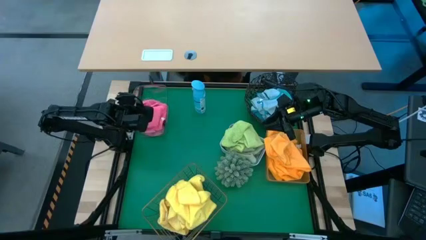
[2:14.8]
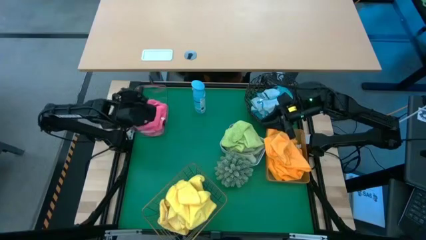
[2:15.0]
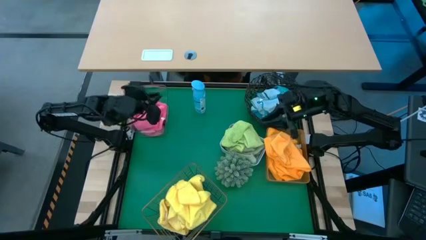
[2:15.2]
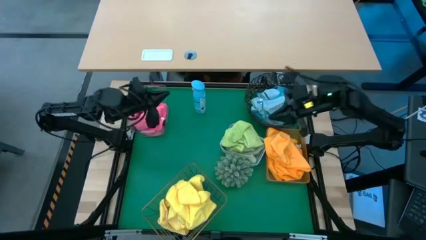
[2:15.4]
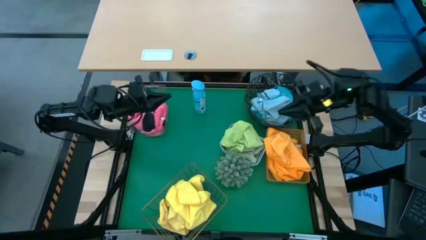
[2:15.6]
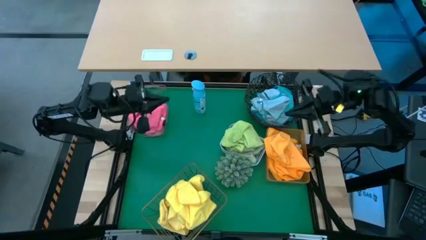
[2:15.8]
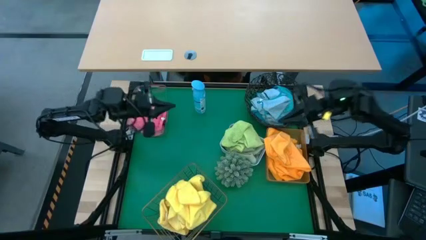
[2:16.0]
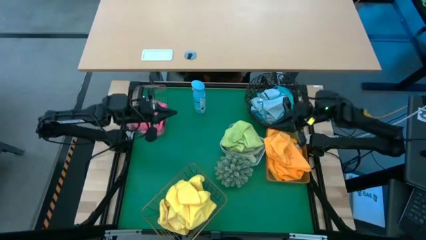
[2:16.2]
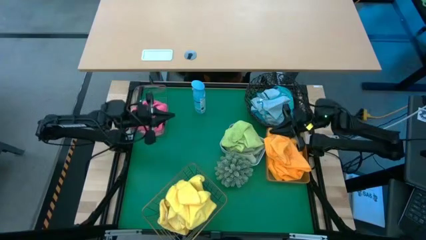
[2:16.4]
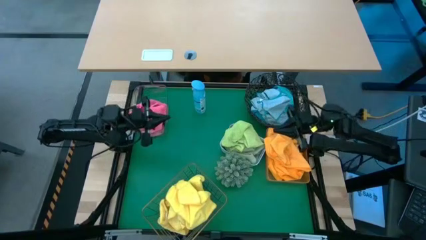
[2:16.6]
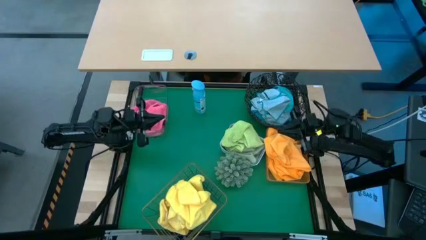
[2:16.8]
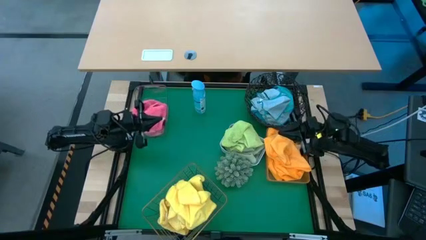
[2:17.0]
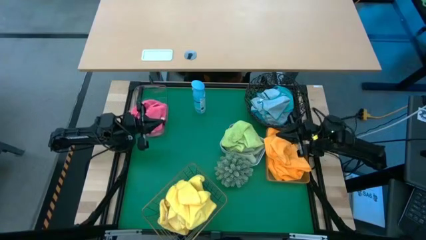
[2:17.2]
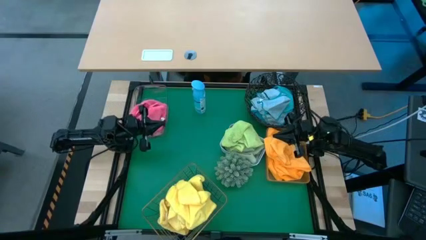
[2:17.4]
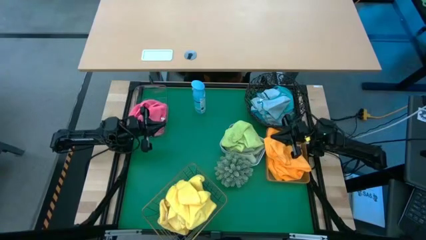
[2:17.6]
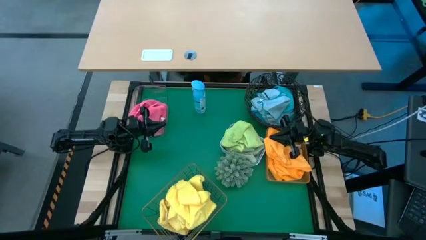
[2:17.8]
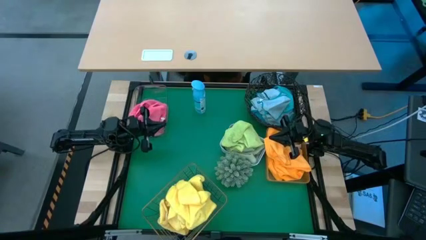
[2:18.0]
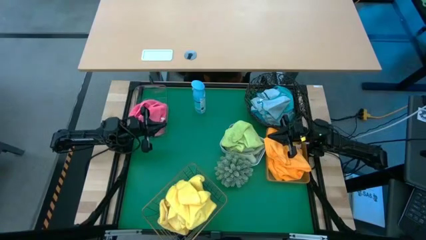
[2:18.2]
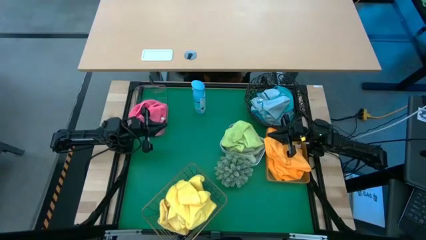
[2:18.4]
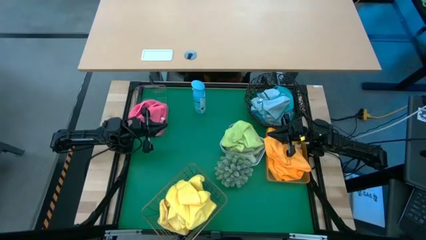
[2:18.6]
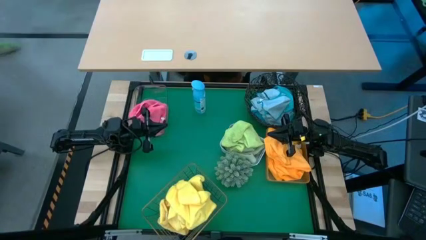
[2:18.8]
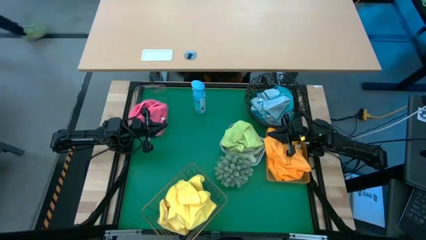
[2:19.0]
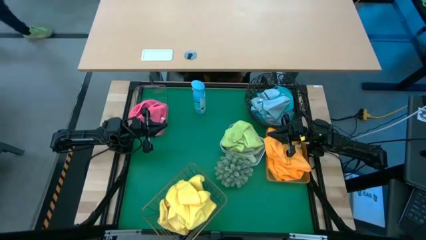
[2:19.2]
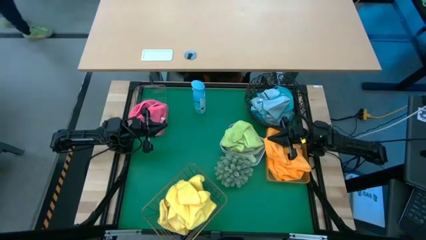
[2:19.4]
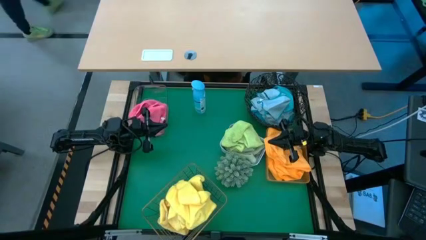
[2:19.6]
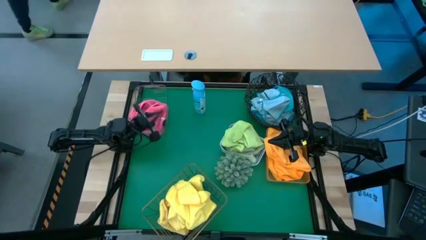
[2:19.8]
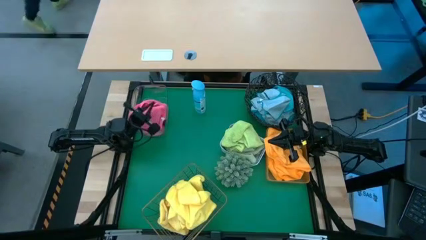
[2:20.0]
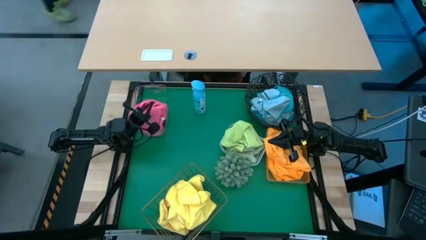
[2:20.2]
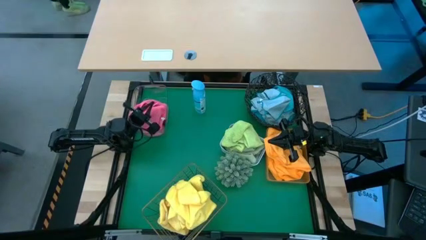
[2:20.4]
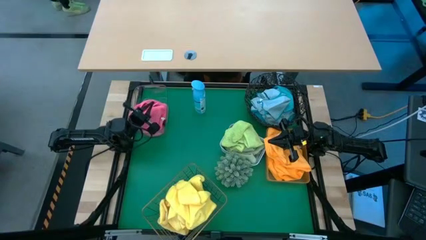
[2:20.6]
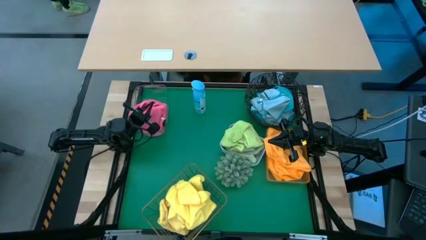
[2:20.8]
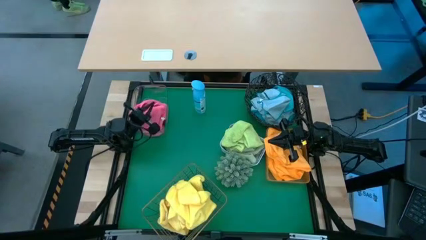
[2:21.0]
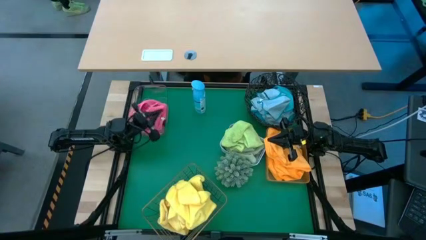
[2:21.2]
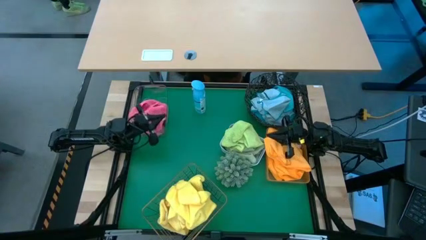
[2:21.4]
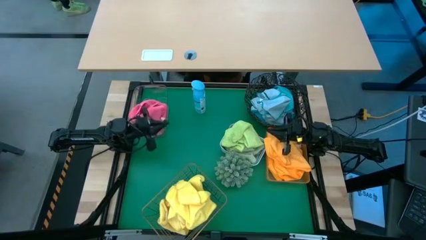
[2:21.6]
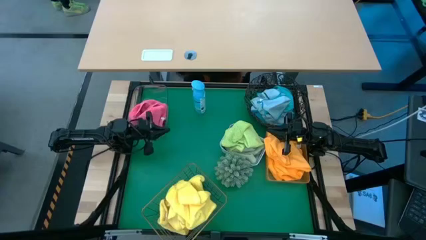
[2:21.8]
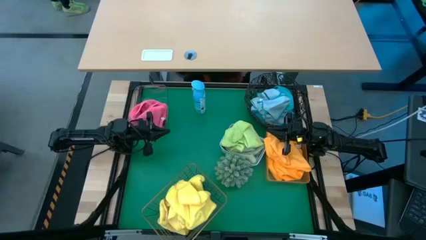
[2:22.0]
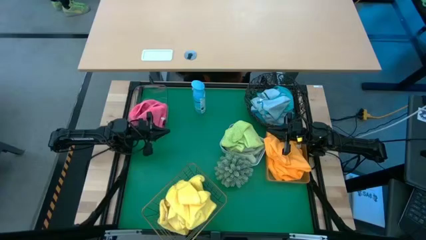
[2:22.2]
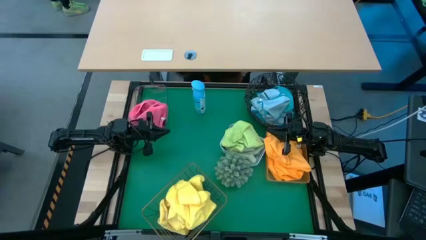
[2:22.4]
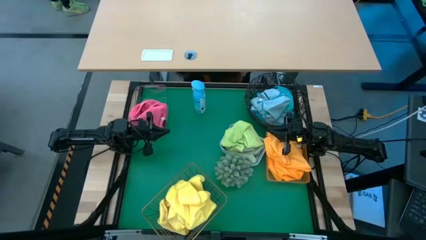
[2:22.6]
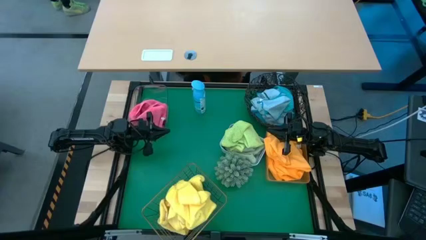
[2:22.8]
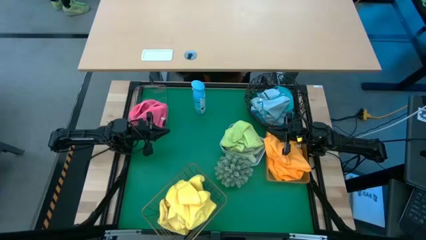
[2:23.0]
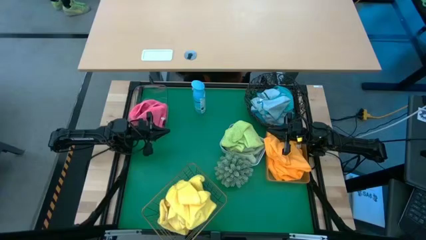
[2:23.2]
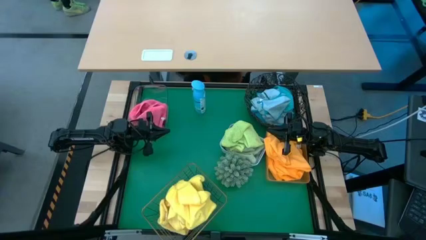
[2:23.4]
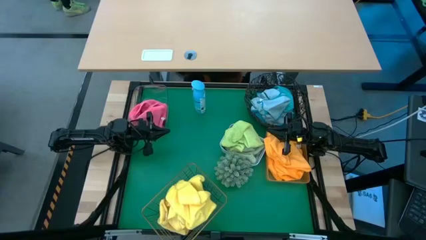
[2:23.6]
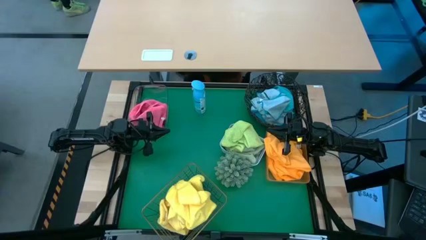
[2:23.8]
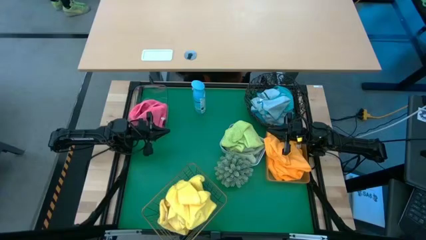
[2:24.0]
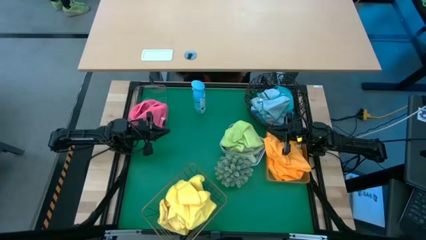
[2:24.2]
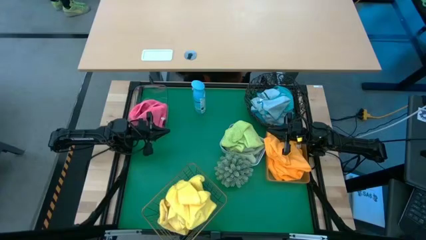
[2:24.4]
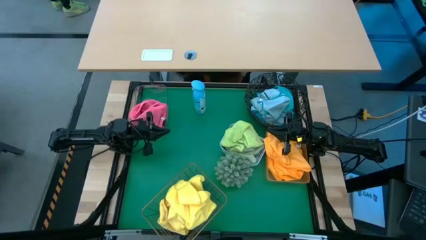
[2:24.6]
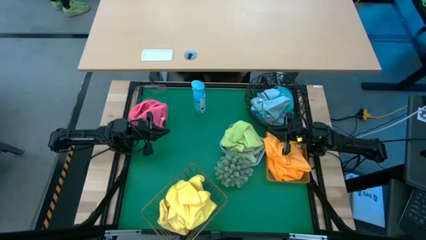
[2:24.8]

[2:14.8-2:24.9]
Task: Sort microfiber towel by color & place in baskets
Return to Home Position

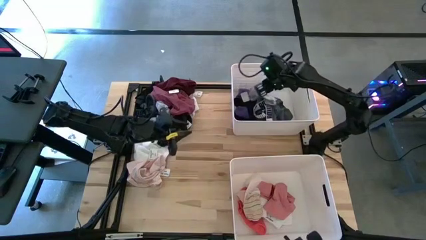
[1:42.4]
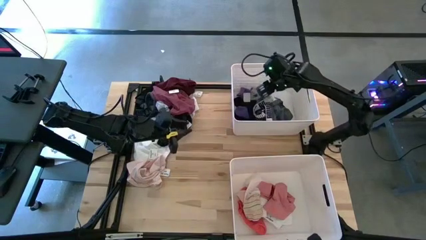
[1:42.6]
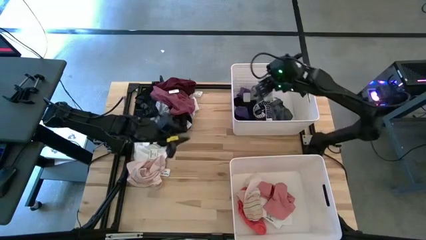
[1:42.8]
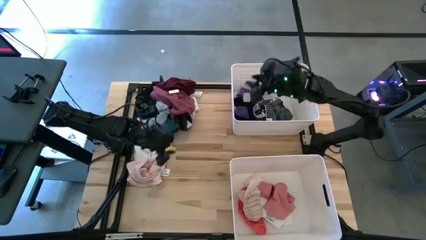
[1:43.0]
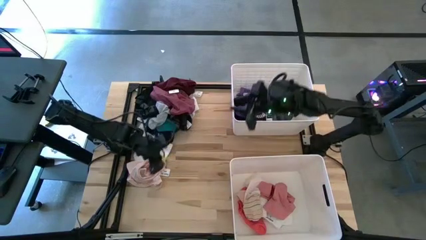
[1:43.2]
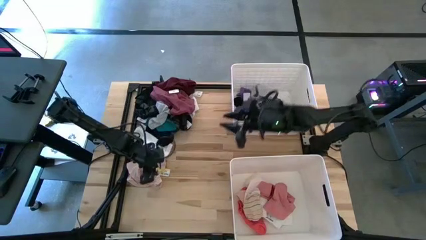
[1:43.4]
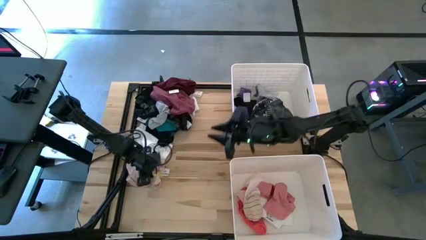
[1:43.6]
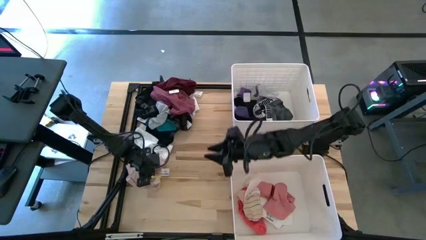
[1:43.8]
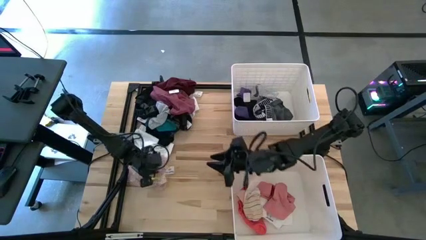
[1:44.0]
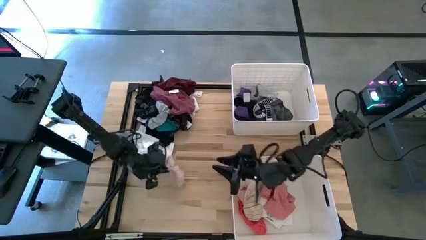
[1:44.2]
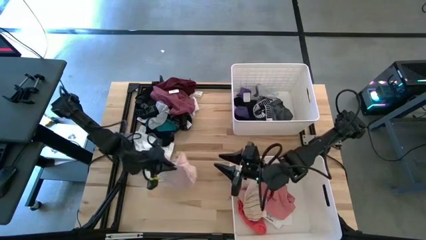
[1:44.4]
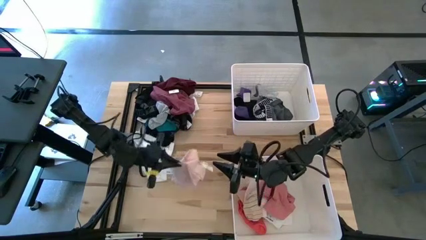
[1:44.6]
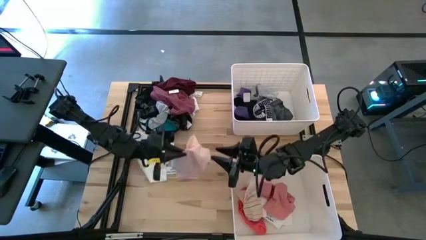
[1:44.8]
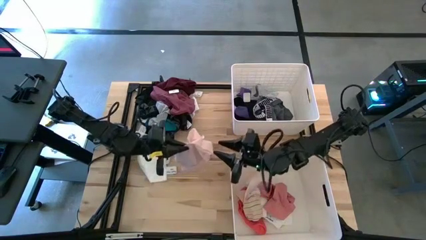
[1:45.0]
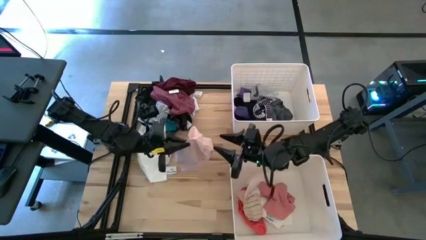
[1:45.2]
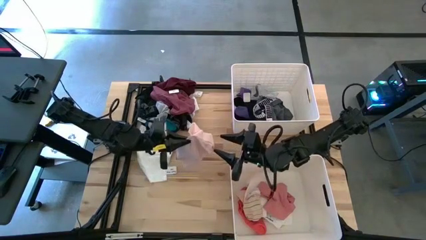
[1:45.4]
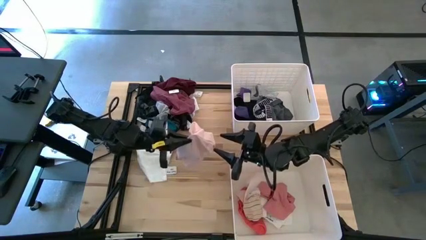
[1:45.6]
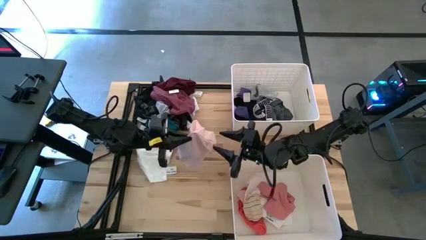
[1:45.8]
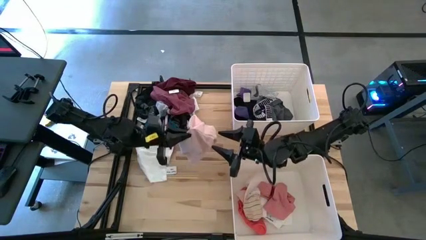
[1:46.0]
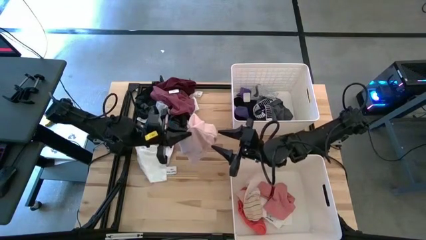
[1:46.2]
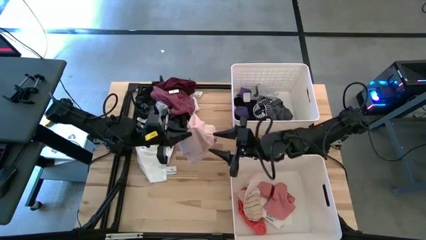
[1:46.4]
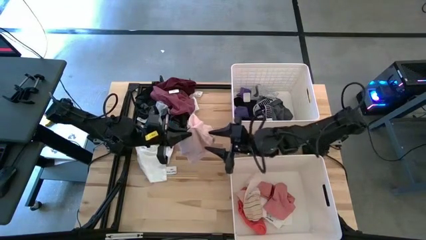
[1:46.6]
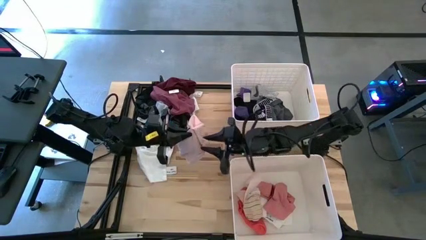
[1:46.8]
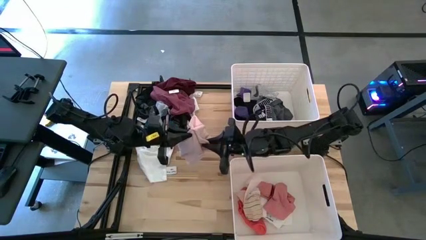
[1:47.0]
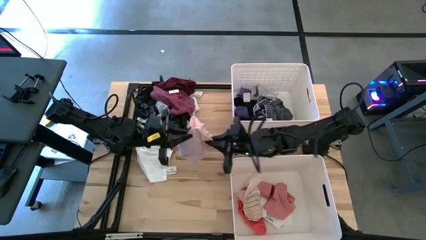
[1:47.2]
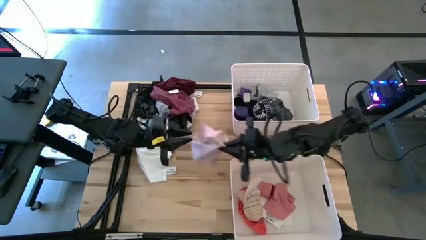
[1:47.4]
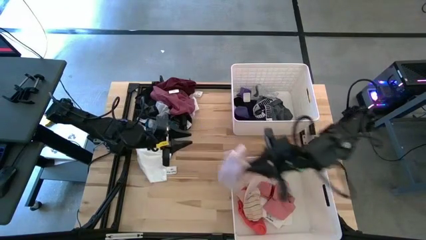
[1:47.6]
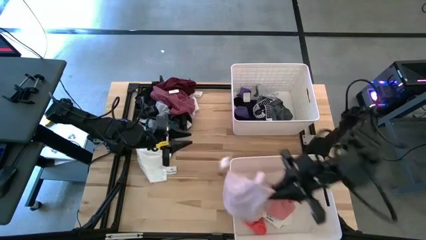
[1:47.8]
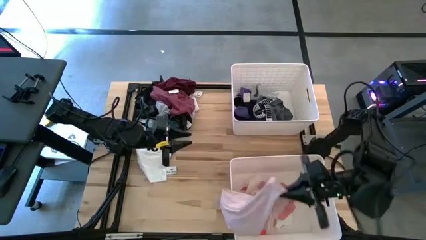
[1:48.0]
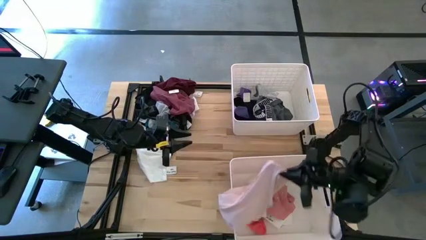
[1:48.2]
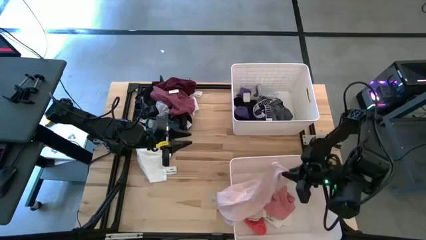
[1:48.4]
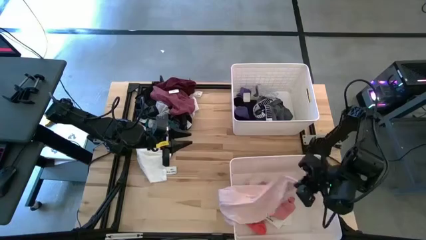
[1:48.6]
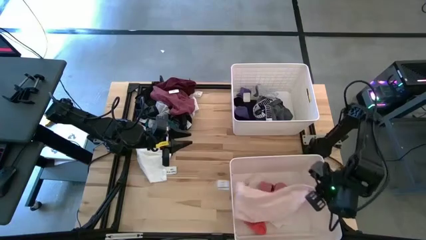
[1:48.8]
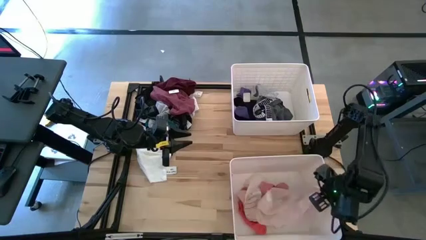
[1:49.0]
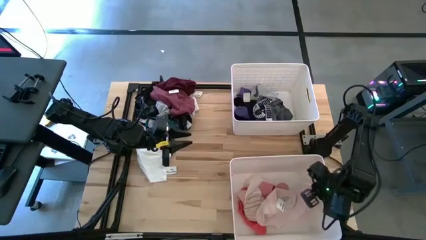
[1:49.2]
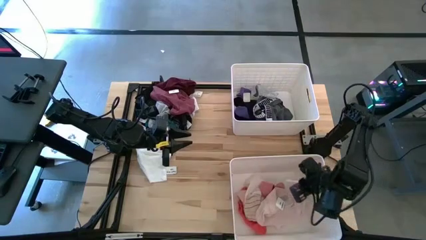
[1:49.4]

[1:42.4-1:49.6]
Task: Sort clothes
Put the pink shirt into the bottom bin
